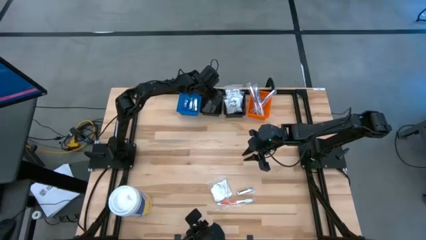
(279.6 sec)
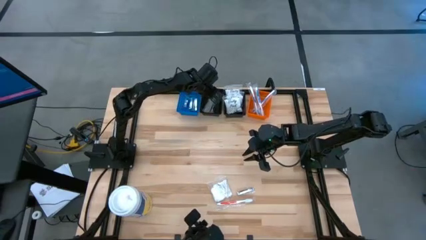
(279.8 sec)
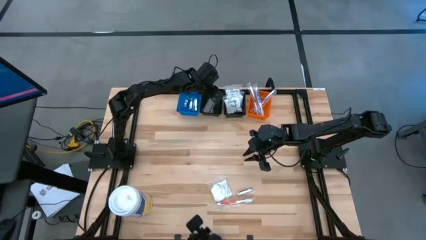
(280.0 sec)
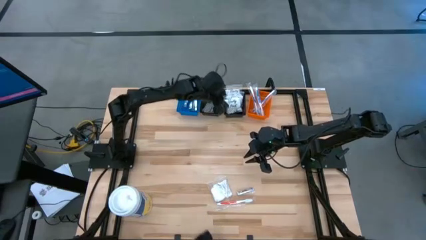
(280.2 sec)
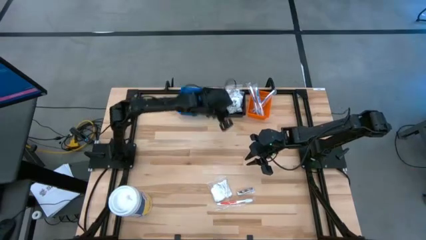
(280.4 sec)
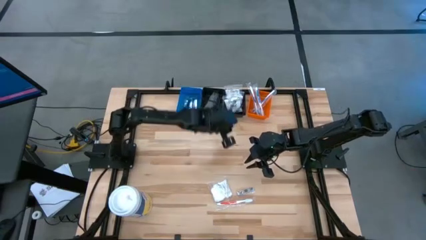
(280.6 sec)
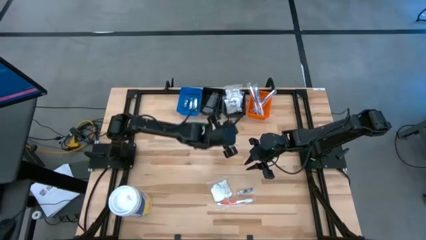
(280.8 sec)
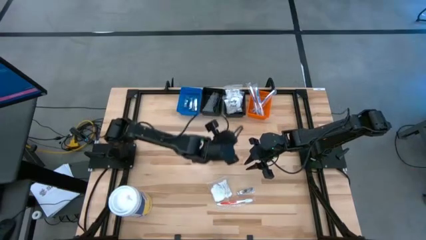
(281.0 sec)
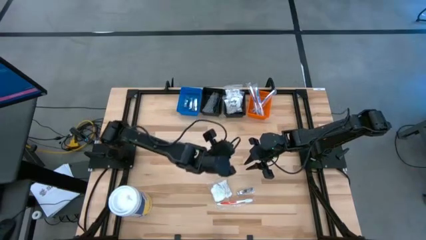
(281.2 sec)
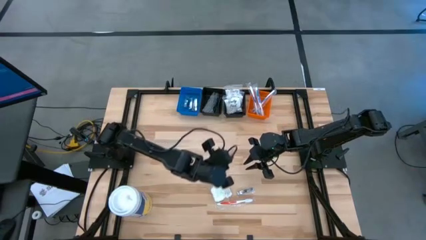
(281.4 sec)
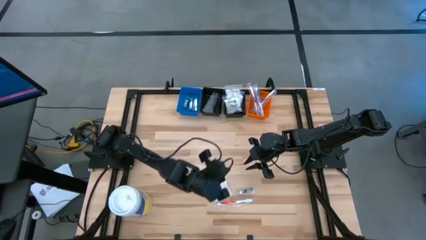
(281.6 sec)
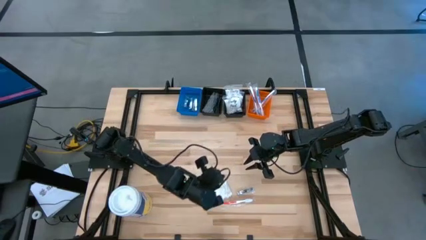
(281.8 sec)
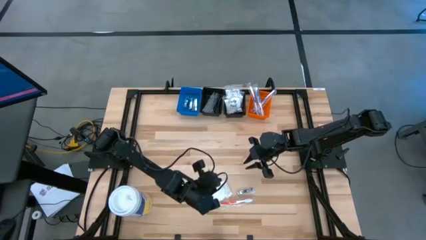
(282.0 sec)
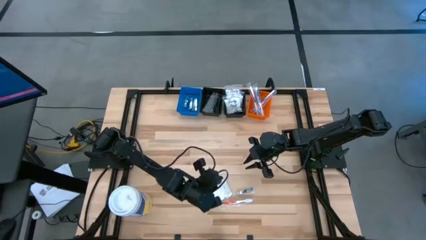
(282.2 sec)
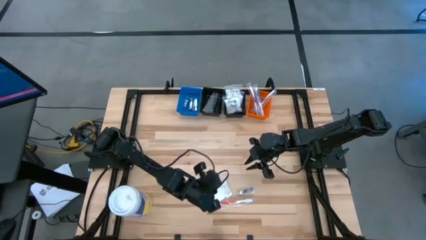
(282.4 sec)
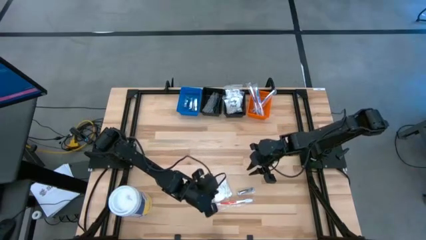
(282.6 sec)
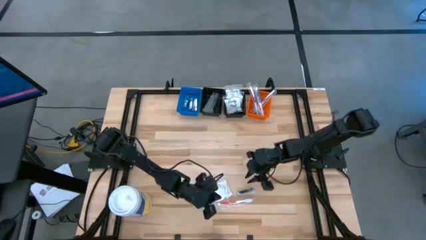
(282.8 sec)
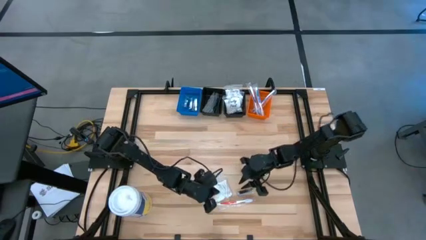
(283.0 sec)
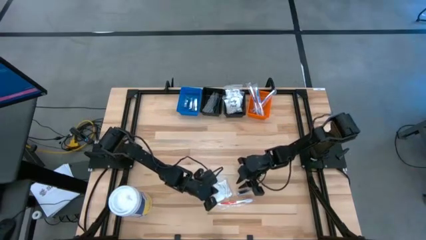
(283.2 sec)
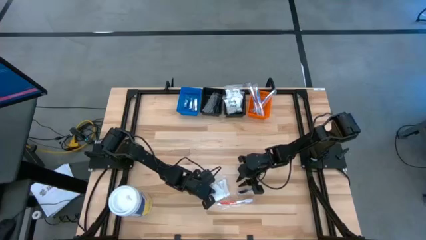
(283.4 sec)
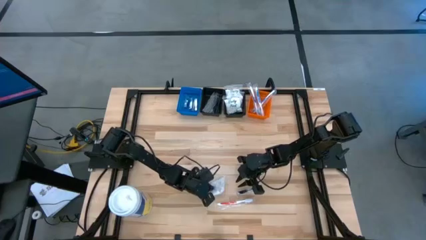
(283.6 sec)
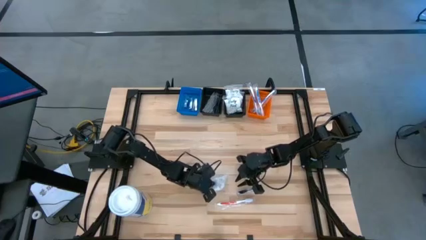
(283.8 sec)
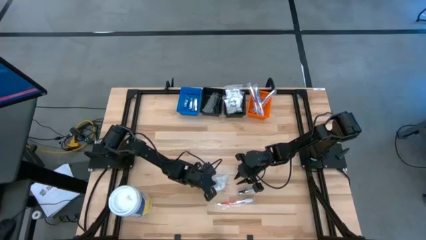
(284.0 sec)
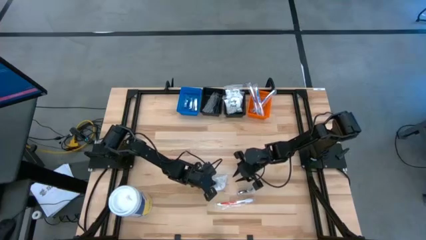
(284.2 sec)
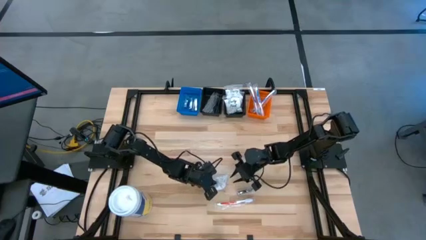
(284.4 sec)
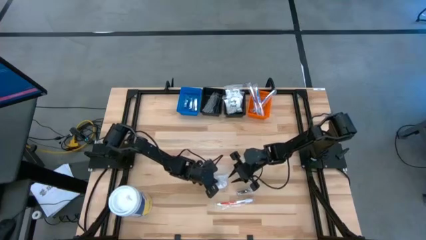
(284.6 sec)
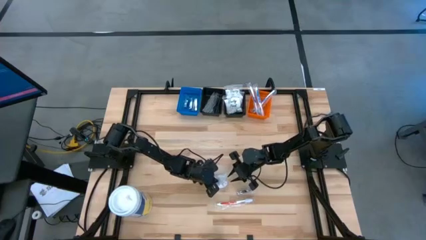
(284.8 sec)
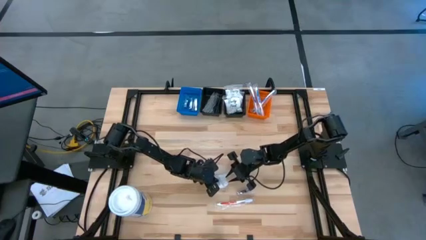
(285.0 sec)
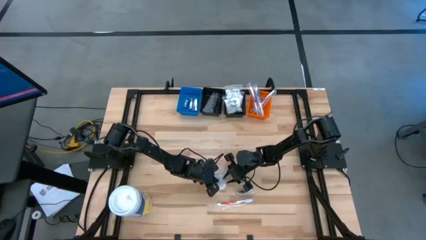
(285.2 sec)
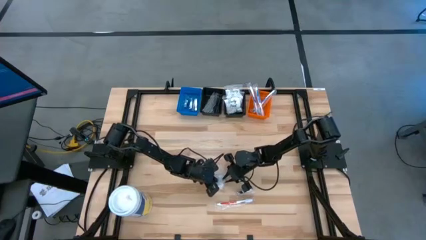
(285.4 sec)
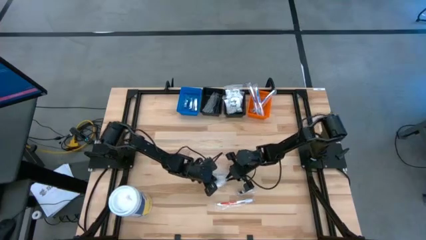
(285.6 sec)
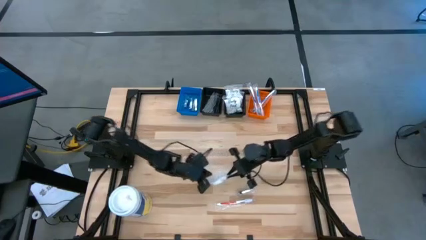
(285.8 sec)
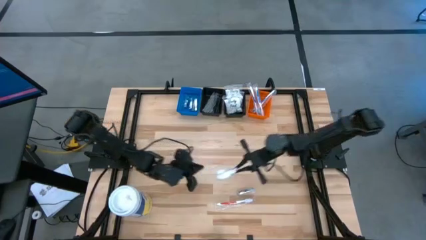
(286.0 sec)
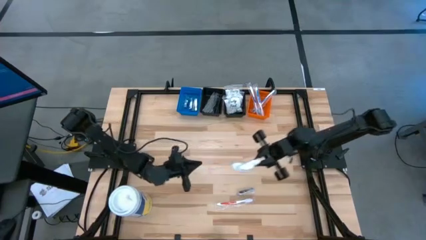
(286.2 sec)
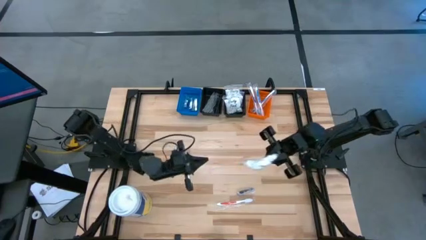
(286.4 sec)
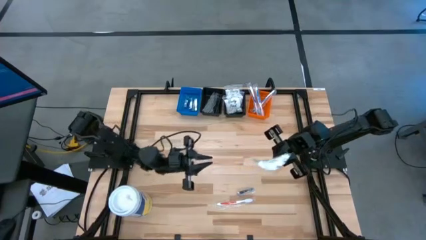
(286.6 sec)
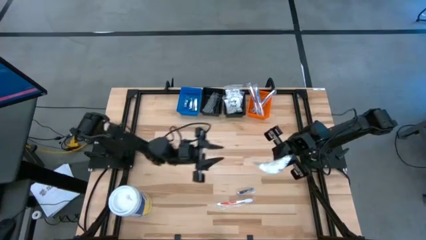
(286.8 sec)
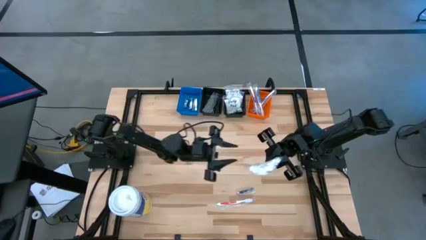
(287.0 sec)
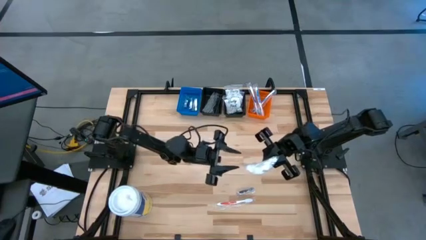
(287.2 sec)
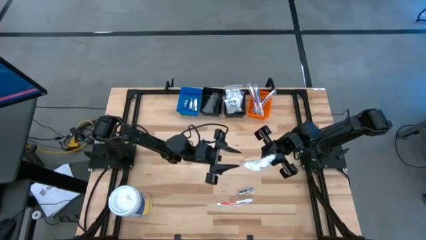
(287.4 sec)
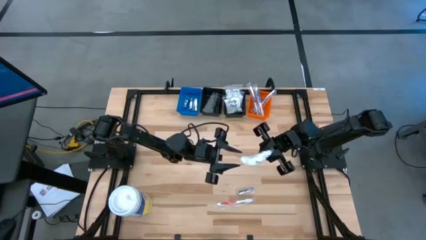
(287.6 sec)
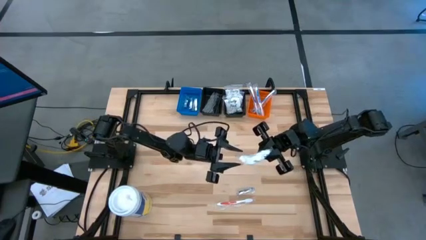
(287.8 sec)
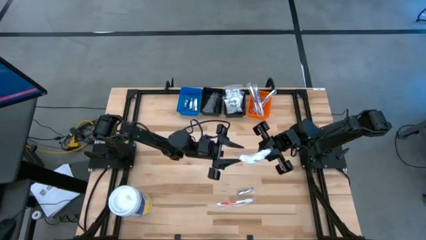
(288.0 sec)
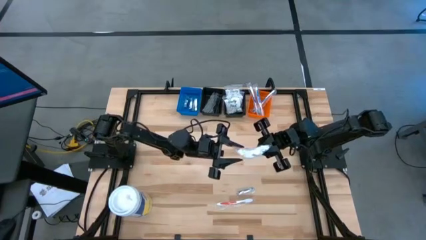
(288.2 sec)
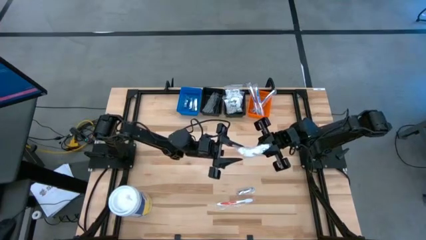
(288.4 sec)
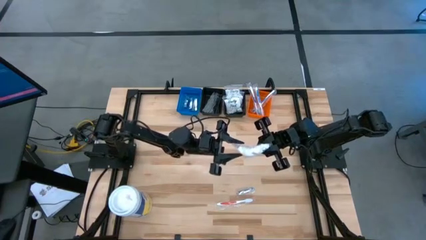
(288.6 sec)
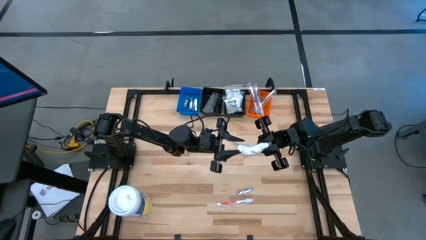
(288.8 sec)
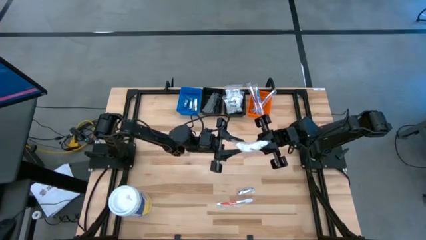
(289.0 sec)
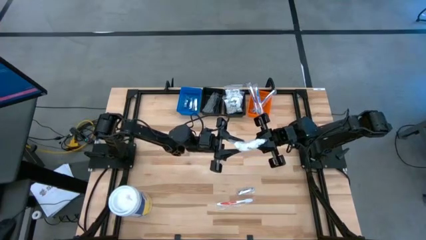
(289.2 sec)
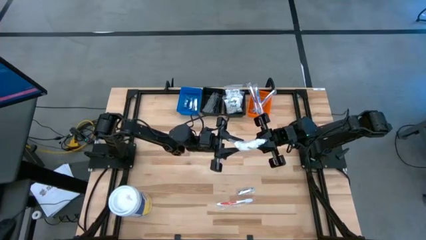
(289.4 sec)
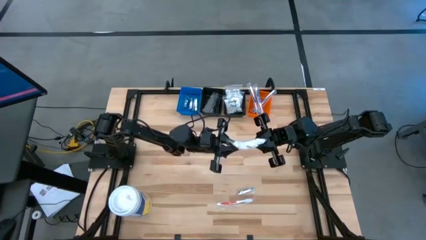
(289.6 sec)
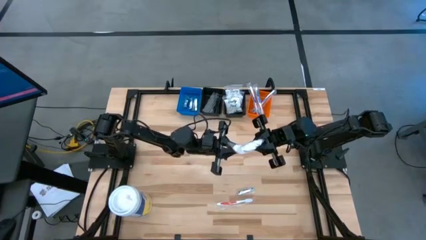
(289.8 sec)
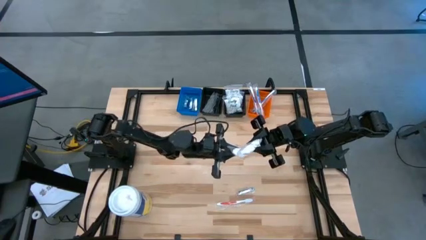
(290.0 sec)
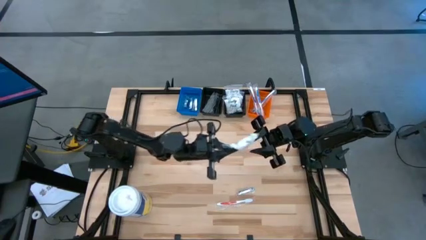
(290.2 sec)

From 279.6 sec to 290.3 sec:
Task: Pick & Place Travel size toiletries
Put the white vanity pack into the right black bin

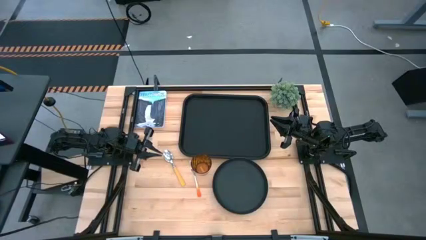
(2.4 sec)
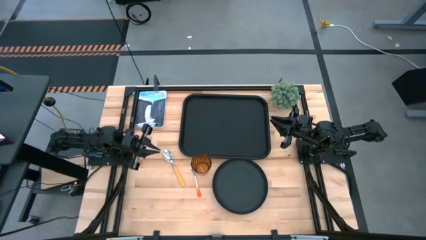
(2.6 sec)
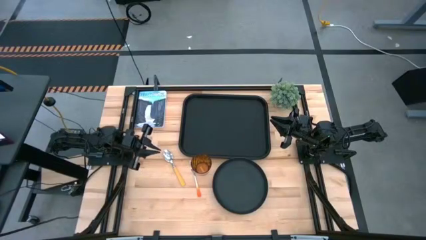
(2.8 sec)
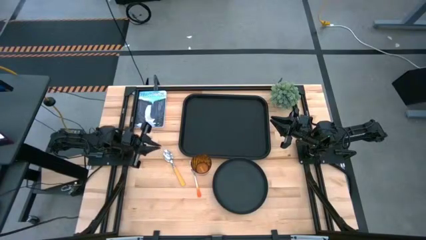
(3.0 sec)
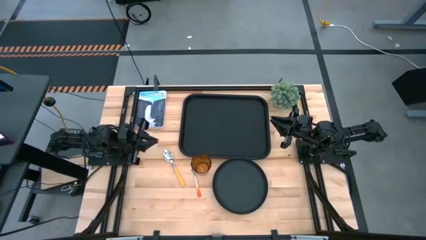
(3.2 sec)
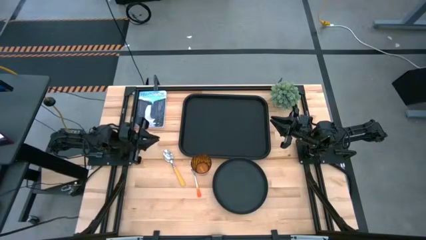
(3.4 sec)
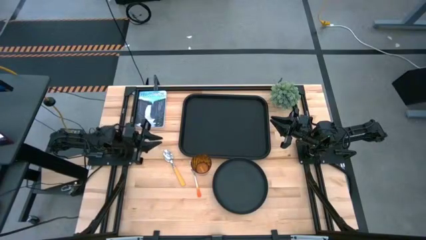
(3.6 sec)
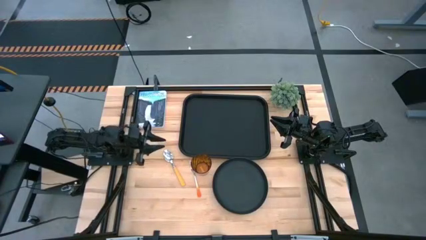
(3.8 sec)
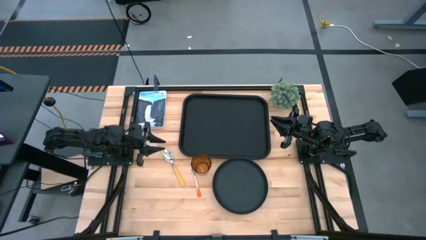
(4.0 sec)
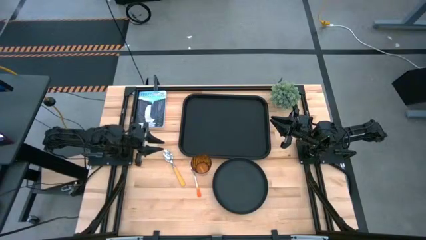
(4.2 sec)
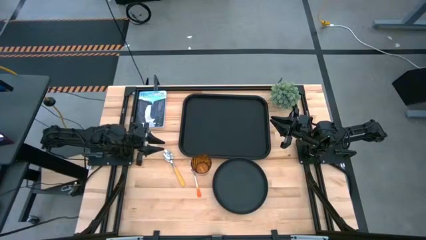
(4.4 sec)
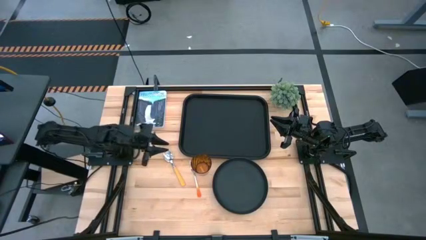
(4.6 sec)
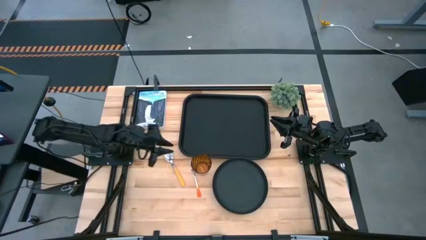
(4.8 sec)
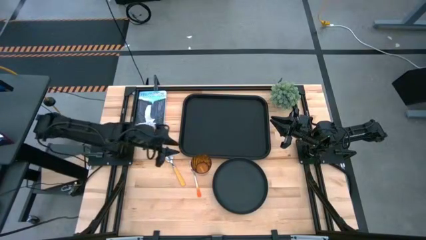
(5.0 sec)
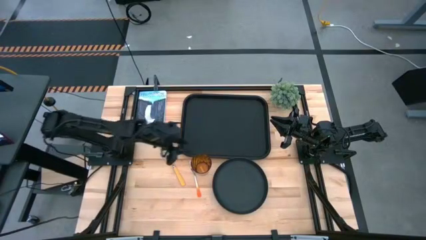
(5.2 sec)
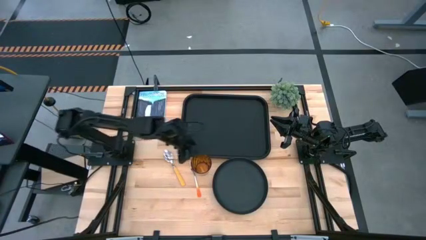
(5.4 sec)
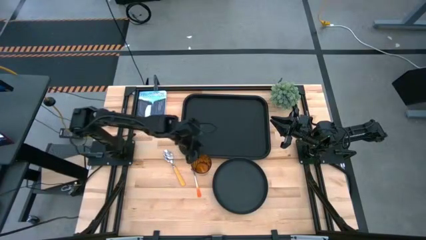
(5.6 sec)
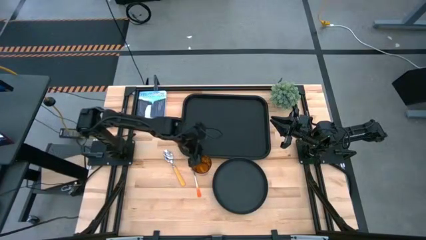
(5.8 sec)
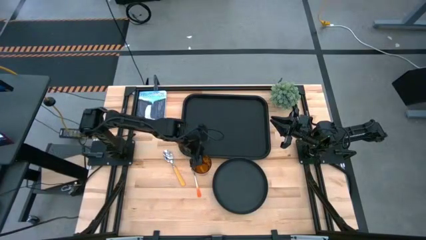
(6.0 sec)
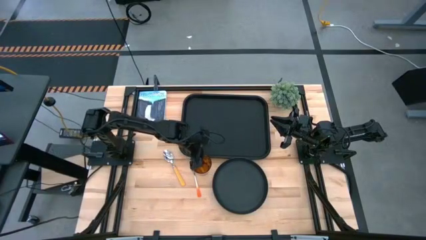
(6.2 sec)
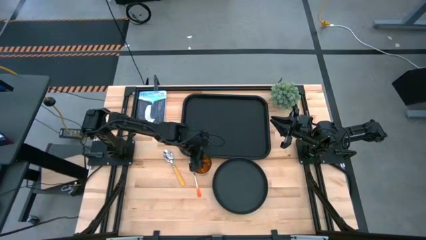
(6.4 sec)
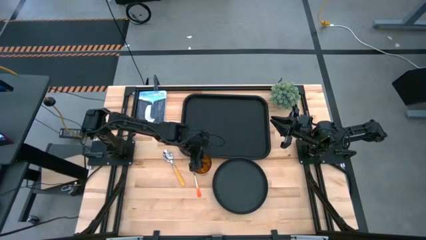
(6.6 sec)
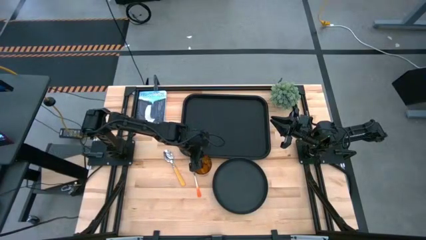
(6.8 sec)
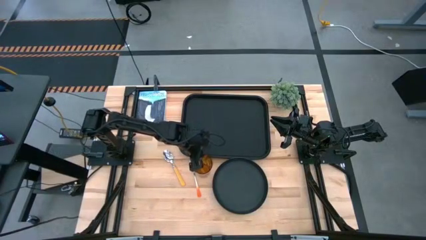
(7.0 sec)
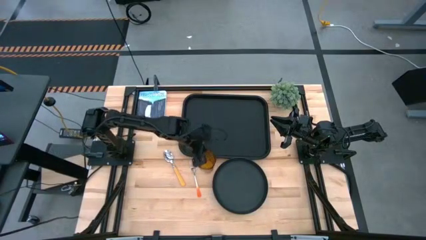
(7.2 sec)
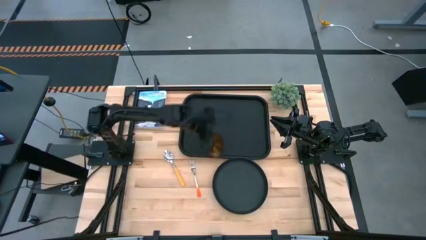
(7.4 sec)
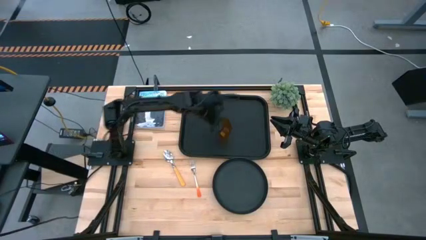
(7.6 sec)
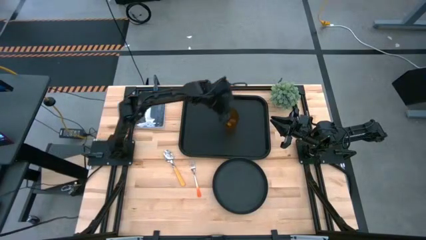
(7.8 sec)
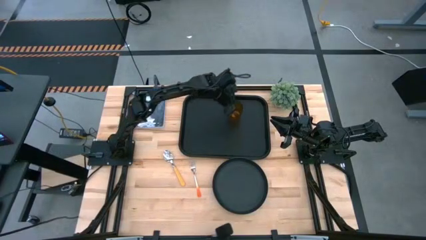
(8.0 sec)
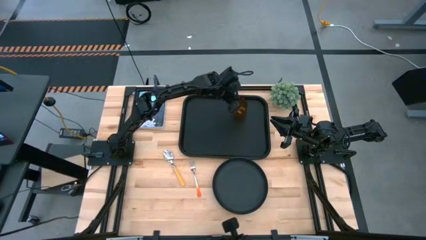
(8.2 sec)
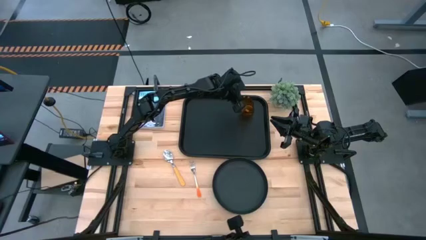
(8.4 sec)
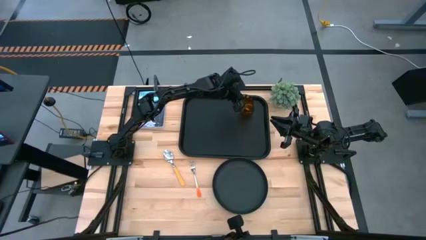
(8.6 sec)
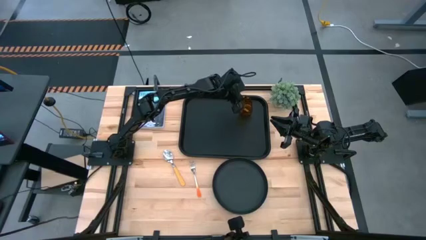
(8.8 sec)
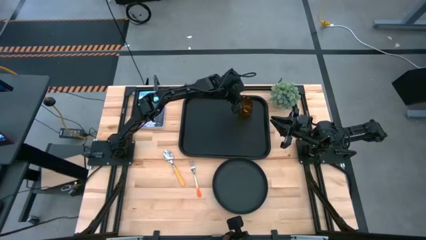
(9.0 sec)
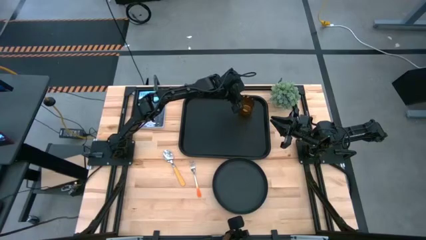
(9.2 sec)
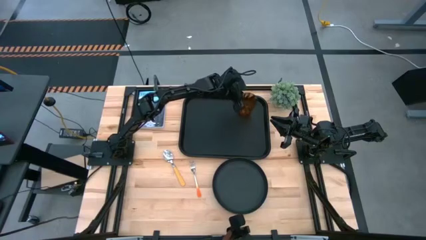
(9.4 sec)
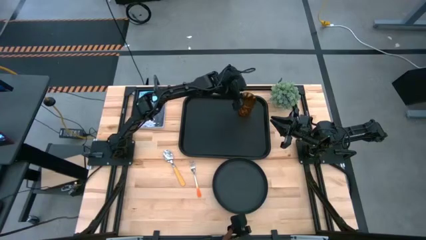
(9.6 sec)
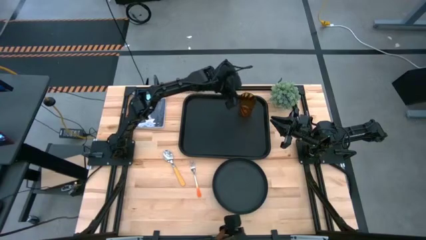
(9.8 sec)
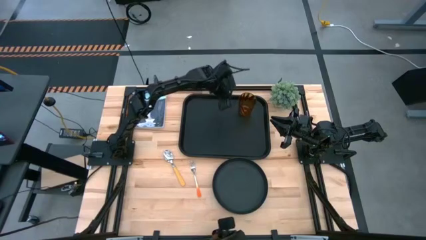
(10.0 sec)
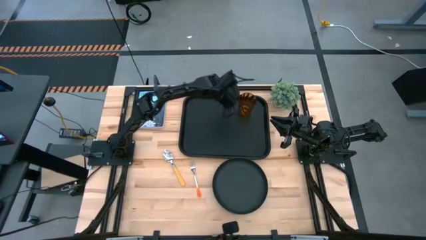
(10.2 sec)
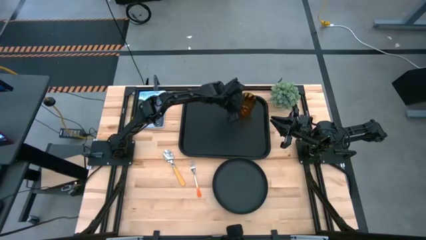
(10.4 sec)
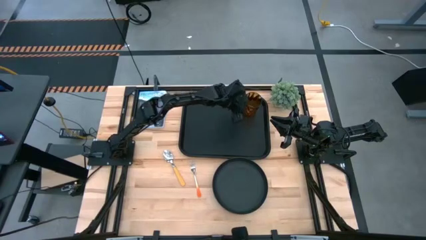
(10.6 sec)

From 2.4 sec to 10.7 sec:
Task: Pick and place plate/cup/fork/spoon on tray
Put the brown glass on the top right side of the black serving tray
